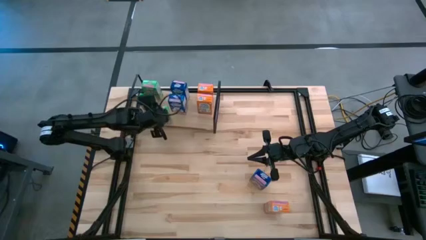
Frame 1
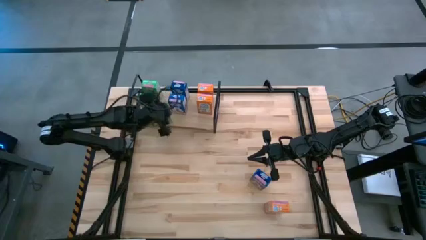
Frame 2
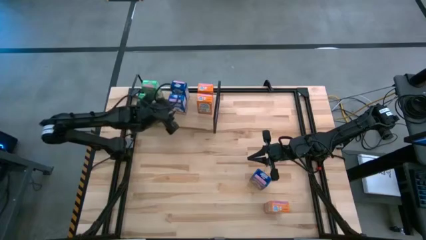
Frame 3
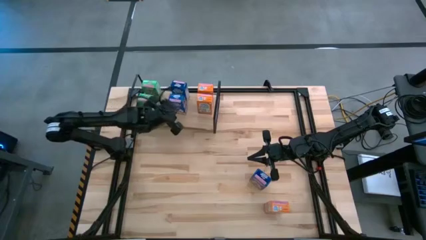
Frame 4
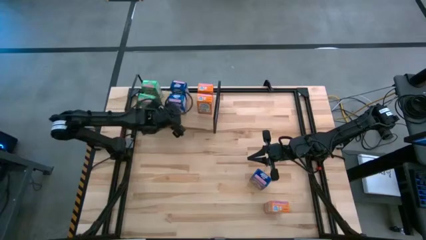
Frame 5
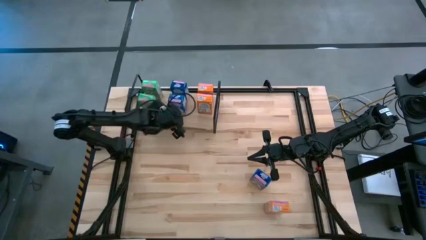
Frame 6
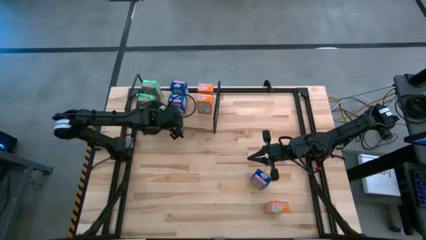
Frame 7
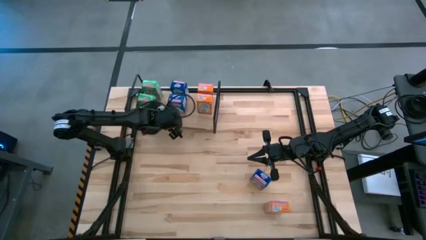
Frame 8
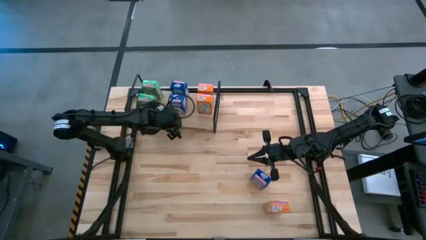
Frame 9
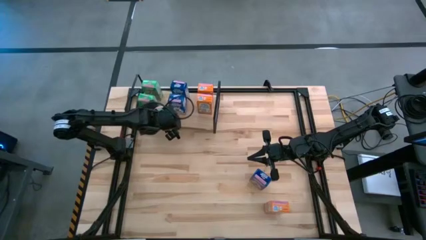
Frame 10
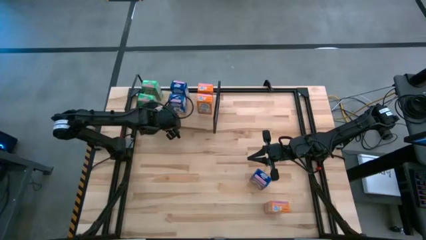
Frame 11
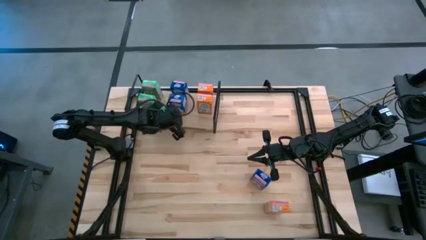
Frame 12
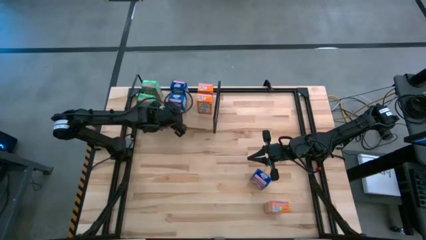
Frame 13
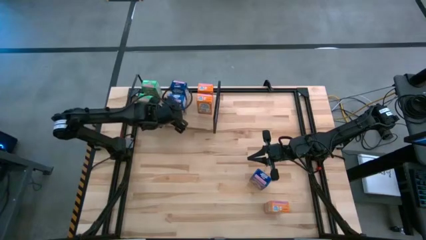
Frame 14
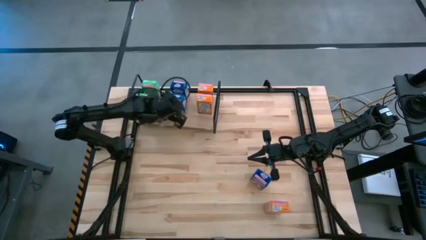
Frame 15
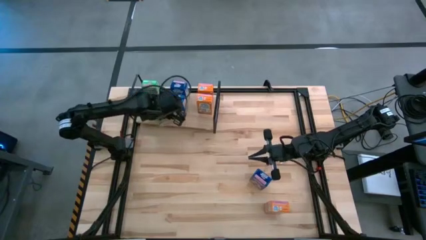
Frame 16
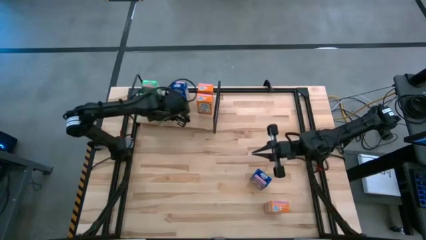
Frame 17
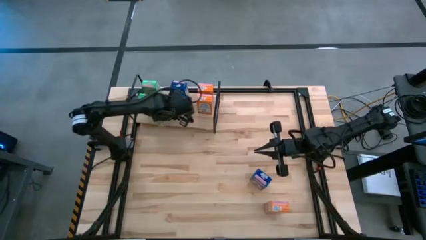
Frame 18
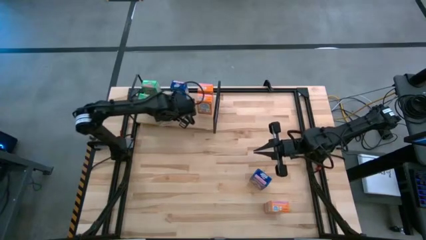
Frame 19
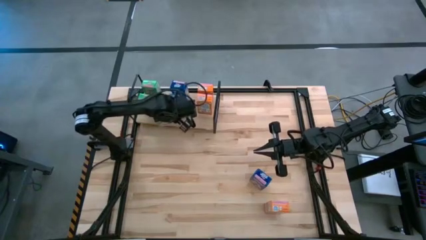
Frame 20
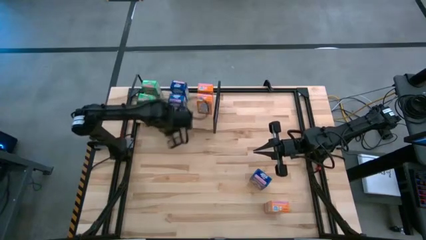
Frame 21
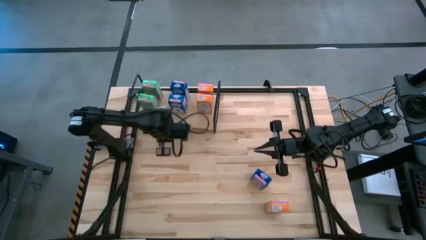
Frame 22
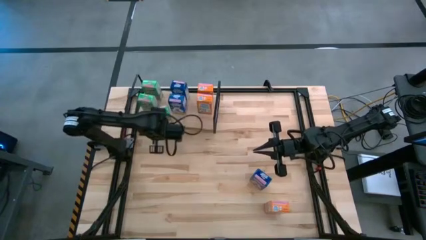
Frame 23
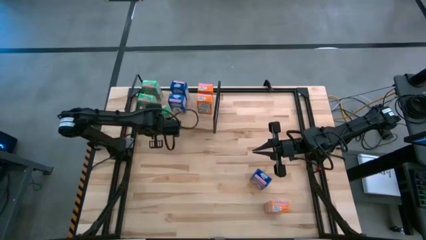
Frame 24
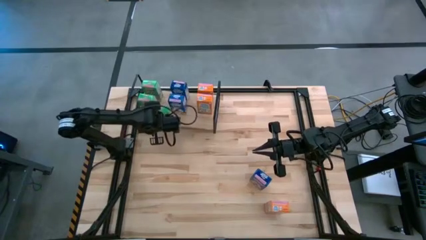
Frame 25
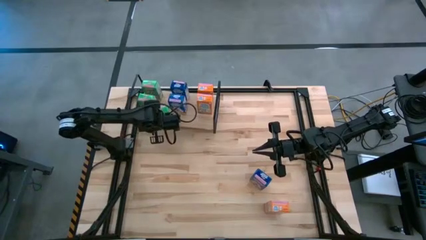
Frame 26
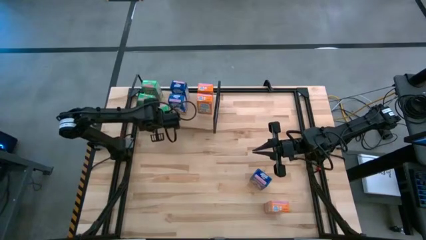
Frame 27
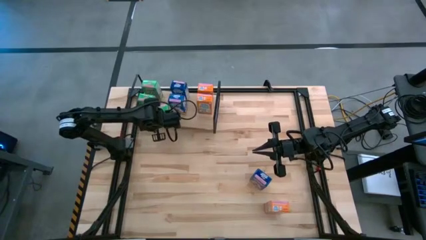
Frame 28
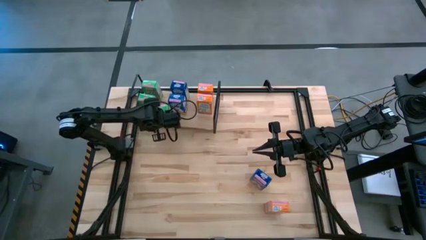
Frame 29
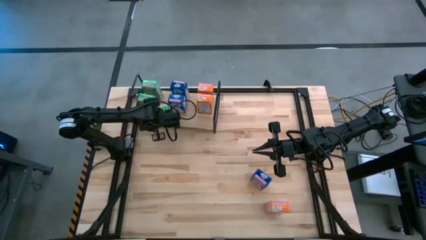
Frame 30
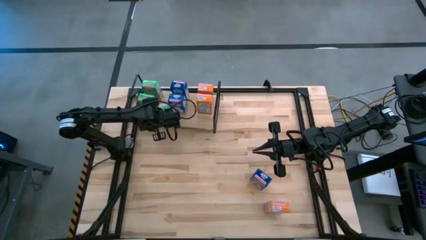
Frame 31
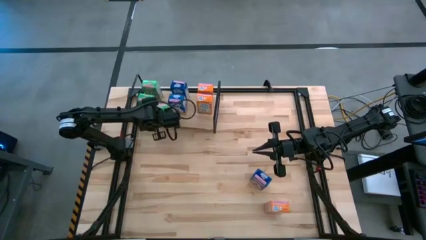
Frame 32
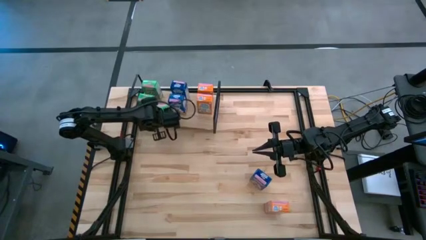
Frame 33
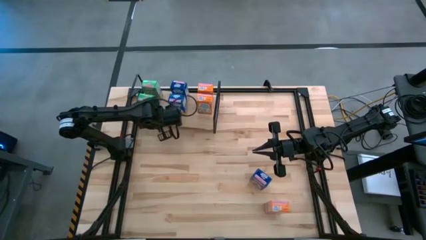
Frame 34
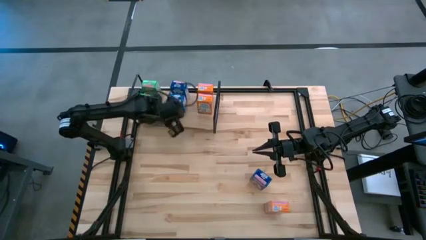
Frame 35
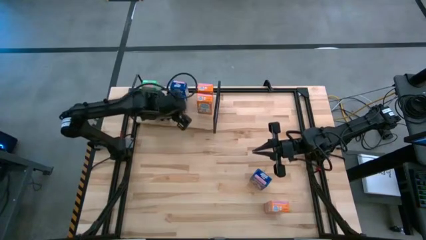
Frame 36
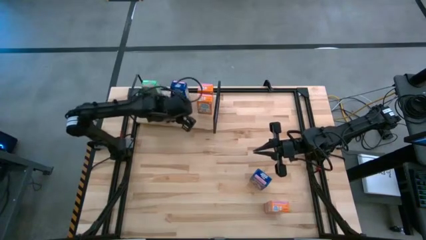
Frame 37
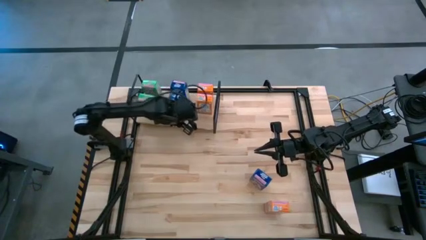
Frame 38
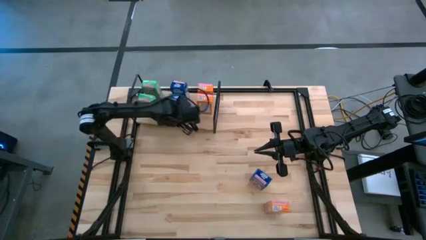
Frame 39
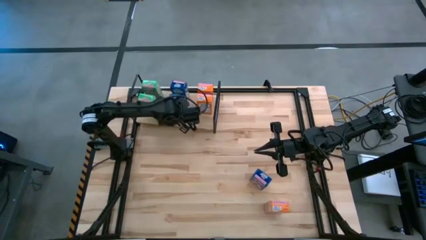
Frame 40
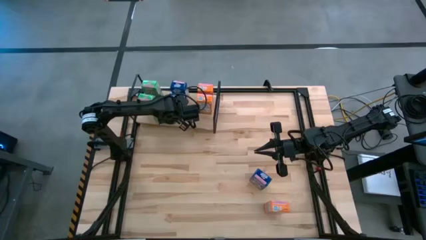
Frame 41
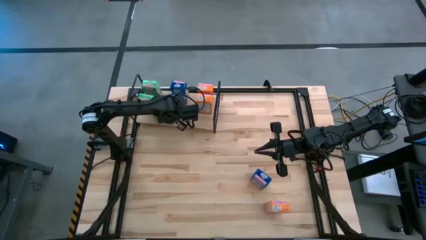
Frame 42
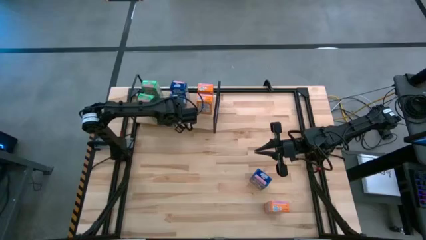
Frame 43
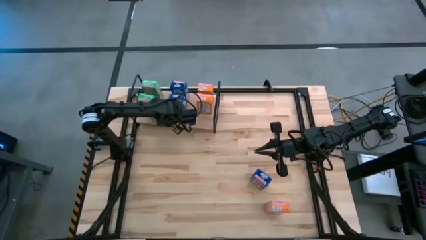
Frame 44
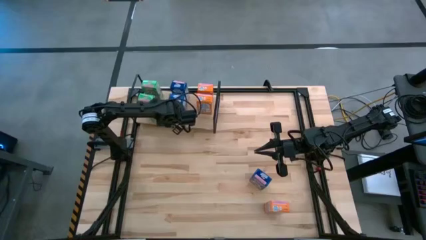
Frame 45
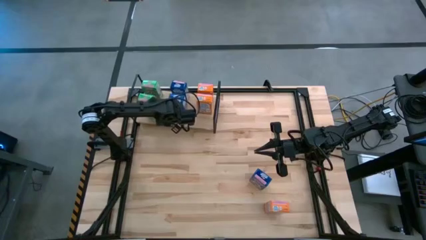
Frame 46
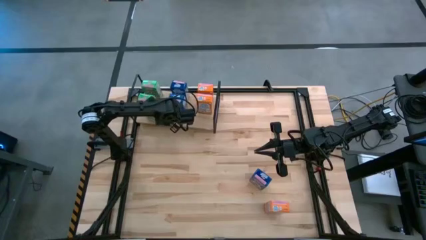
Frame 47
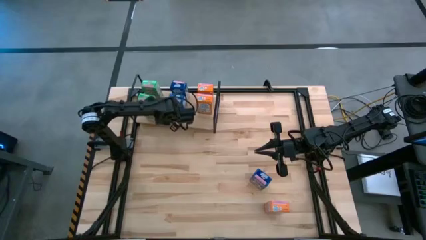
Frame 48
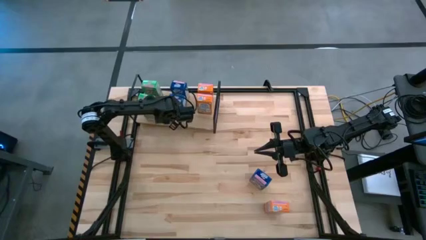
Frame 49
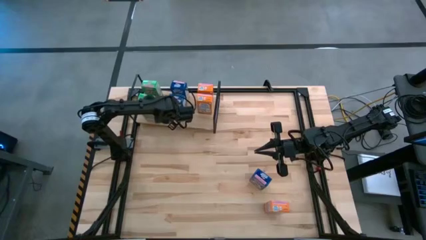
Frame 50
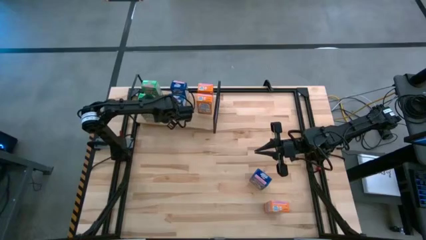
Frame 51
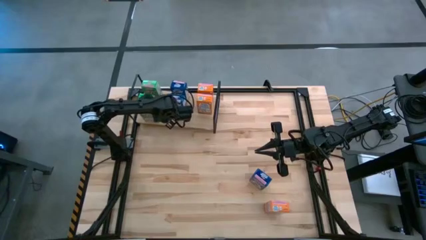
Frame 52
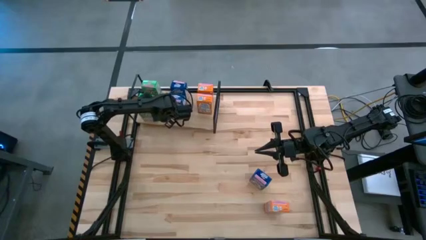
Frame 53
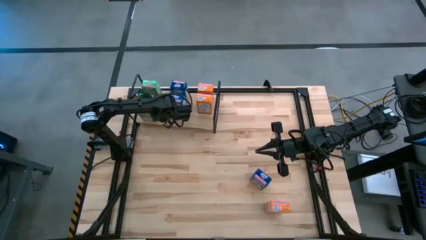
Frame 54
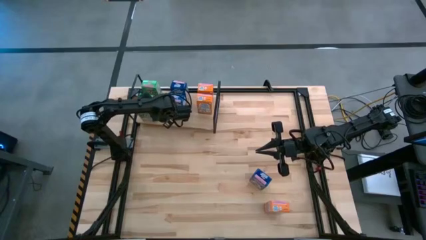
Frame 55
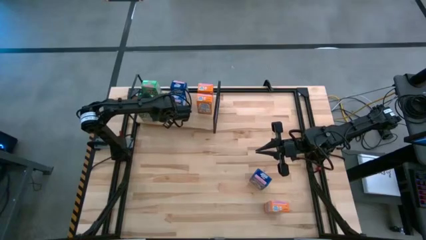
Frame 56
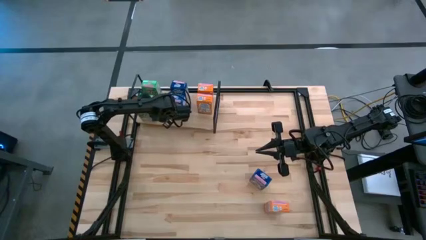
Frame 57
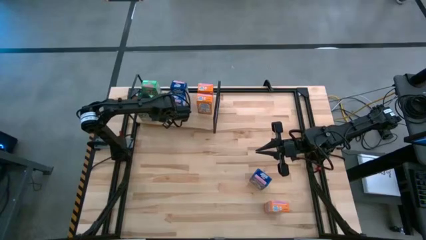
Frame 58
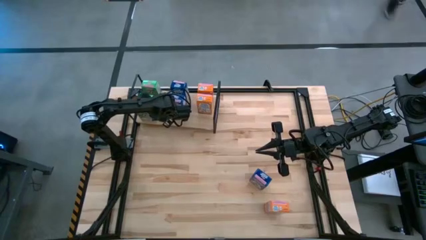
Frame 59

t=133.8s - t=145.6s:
Task: Stack cereal on shelf
Put the green cereal box on the shelf aligned with the green cereal boxes
